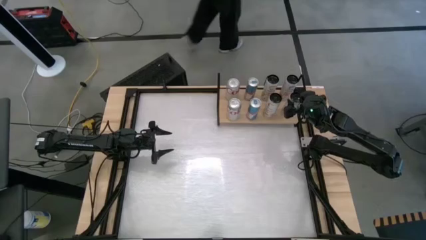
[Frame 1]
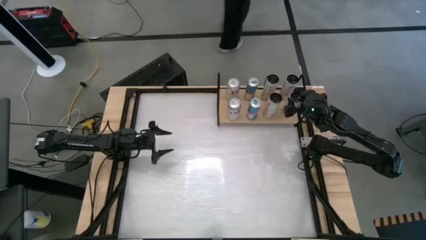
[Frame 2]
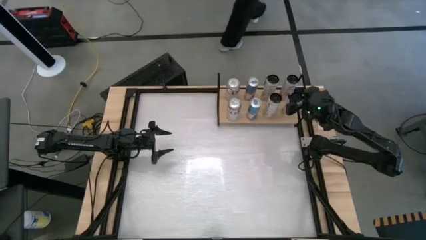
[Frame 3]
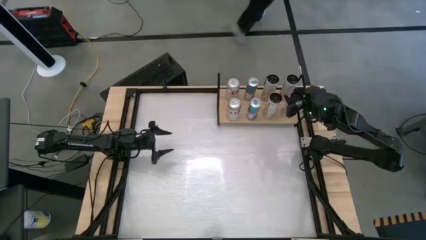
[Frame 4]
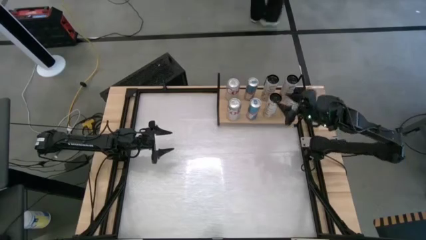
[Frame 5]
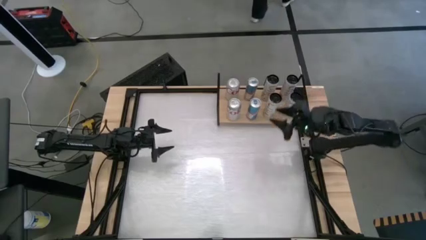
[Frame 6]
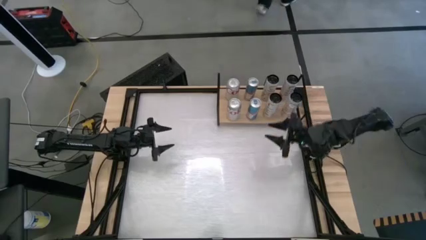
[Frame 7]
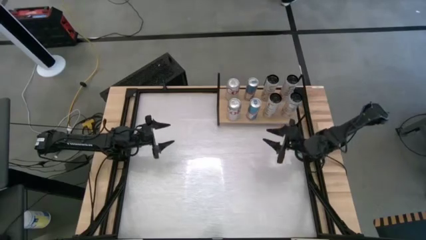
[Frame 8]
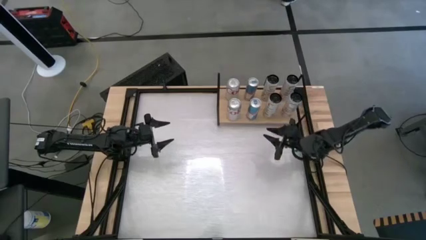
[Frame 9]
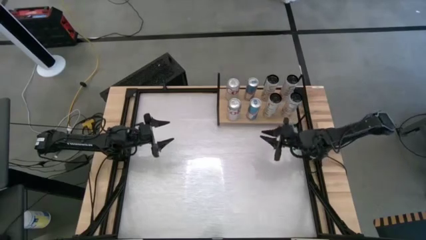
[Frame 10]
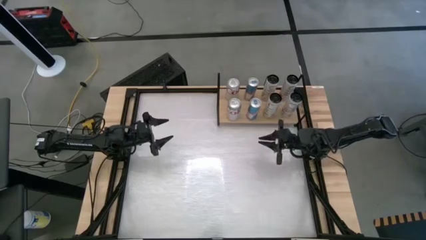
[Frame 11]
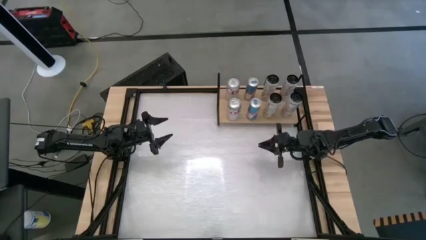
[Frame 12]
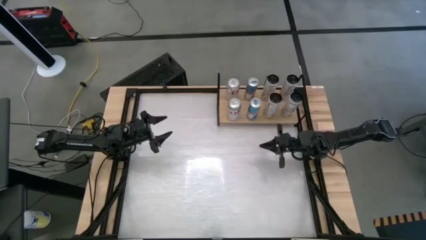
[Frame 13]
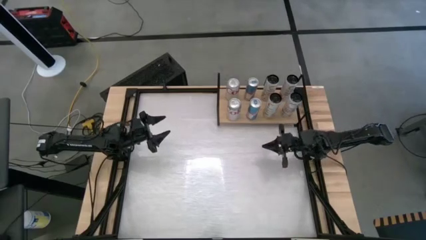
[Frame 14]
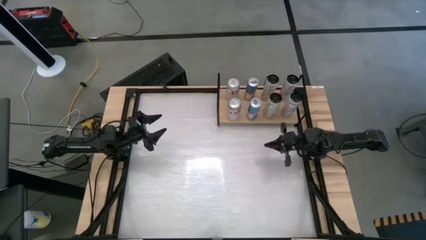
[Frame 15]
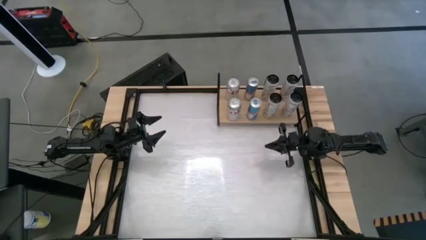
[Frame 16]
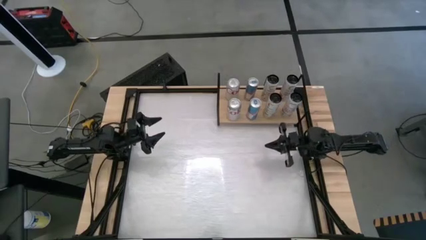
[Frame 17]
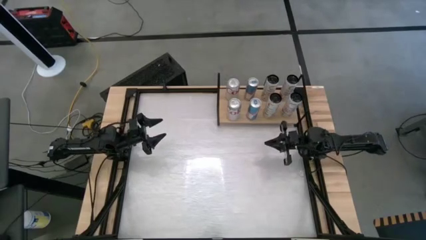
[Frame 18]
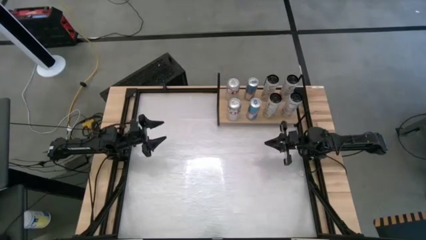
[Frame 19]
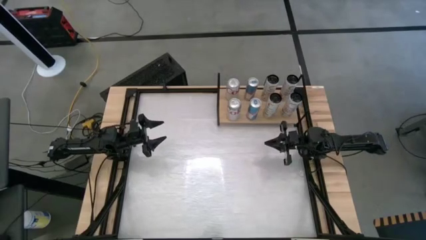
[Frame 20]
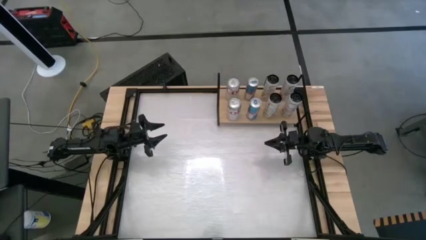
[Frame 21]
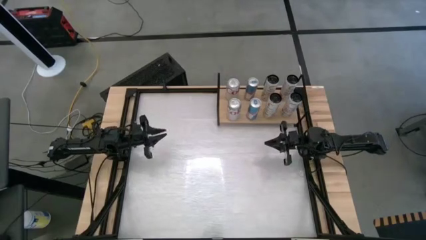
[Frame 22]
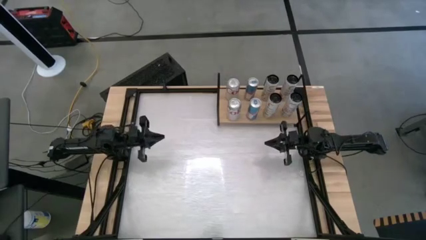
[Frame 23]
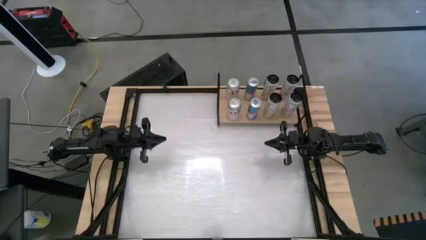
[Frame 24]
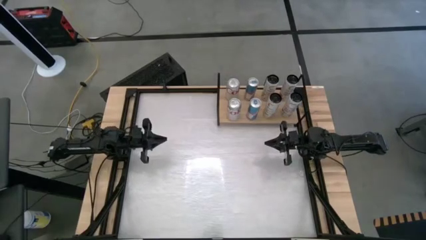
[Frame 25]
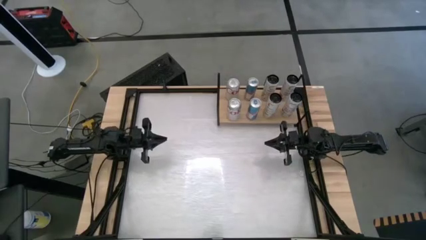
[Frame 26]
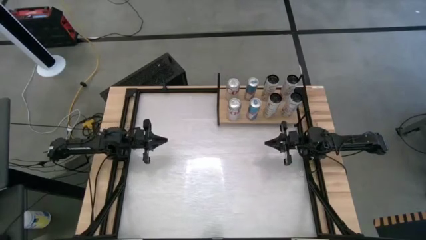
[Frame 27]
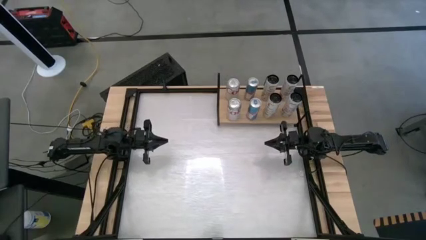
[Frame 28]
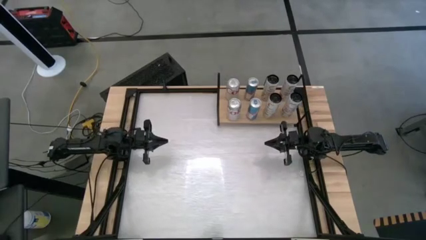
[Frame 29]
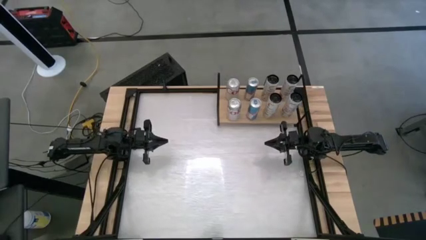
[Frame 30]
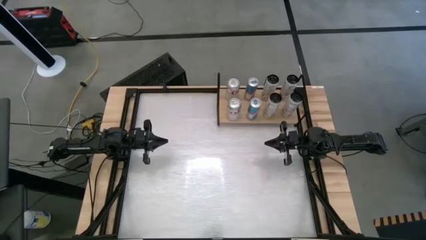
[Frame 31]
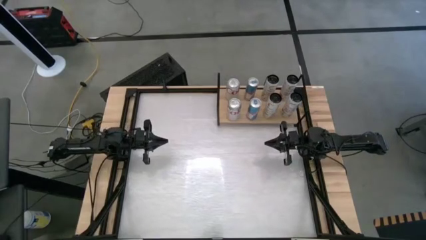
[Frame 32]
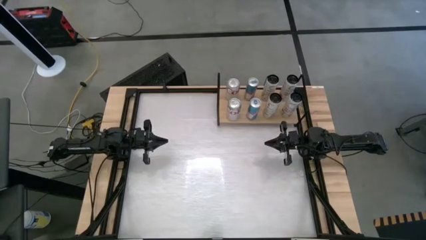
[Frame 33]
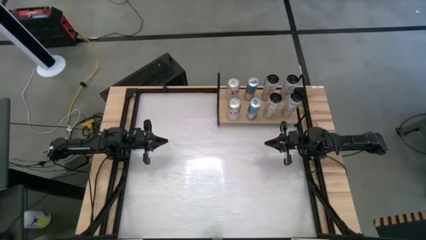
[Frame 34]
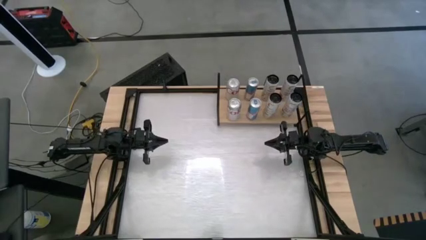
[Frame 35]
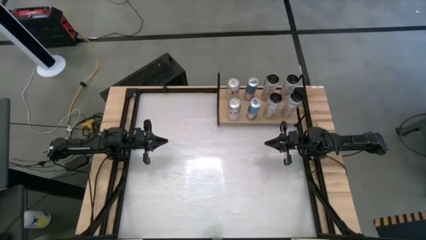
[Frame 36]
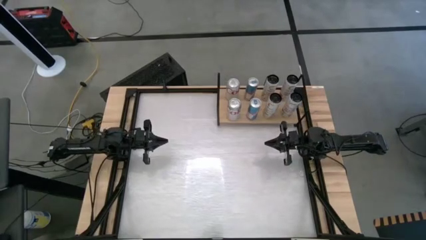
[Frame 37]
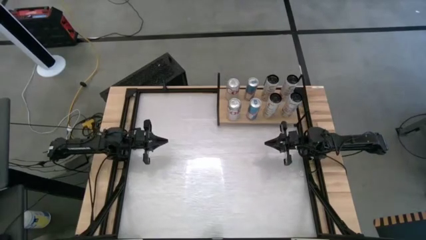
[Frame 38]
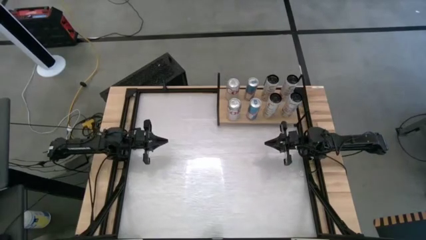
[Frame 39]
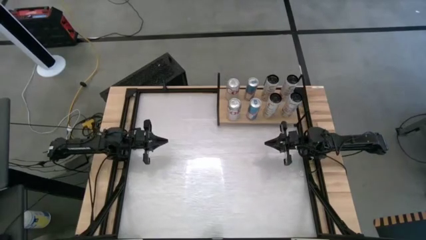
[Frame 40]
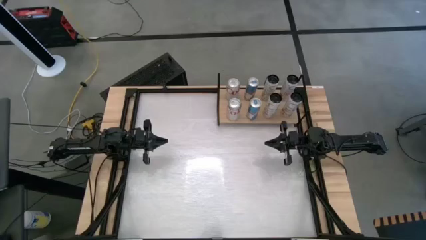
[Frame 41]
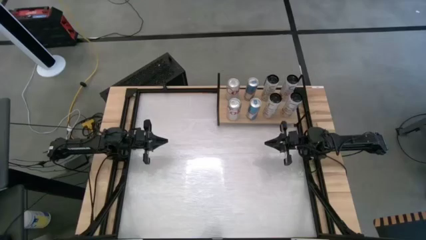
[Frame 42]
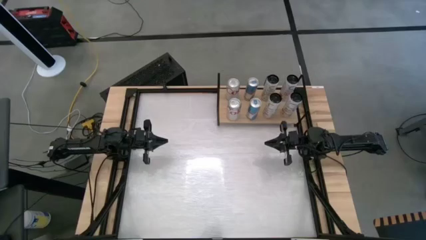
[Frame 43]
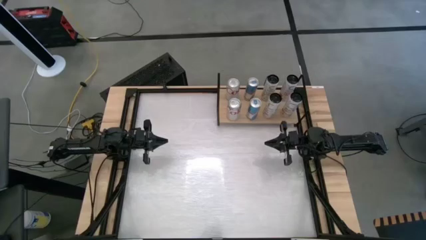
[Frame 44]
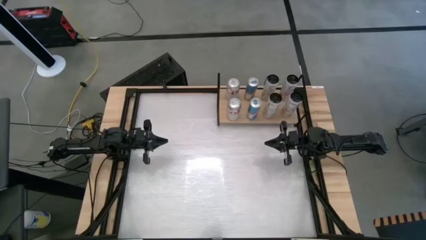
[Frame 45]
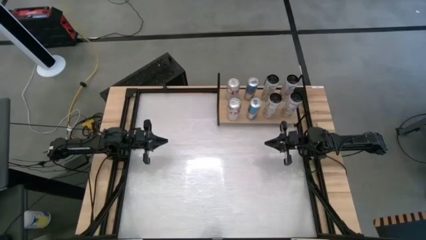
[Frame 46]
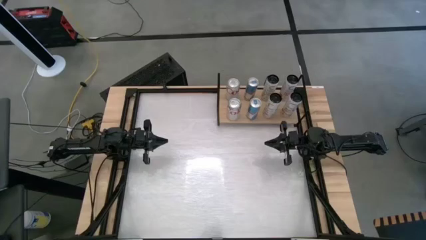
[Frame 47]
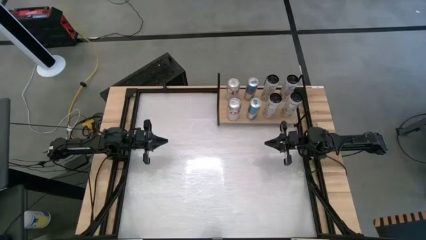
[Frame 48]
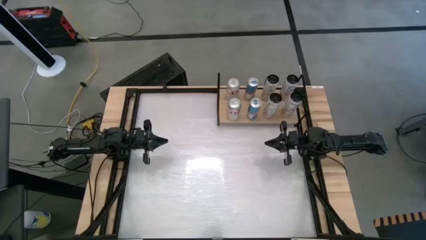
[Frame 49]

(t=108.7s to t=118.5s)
Task: Place canned beverage on shelf
Return to home position

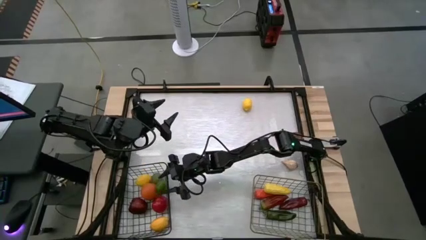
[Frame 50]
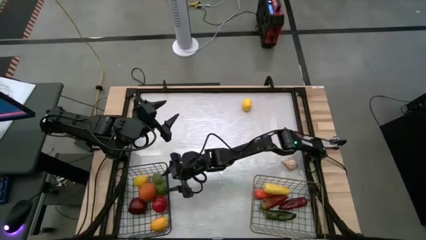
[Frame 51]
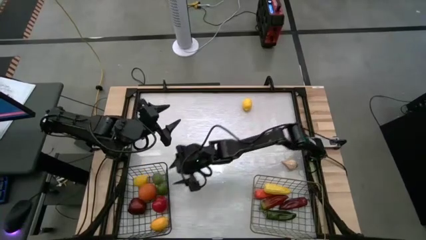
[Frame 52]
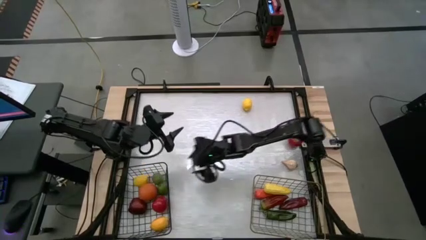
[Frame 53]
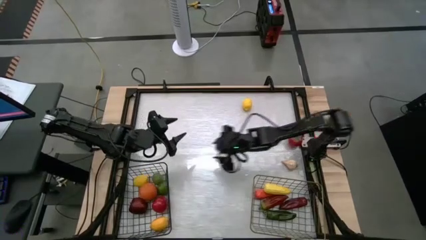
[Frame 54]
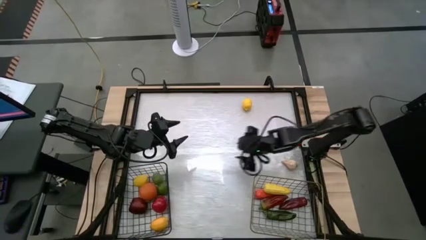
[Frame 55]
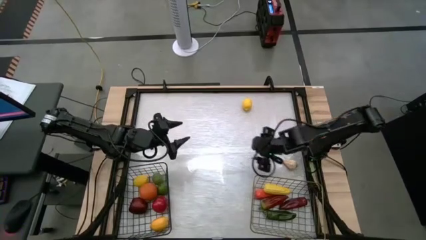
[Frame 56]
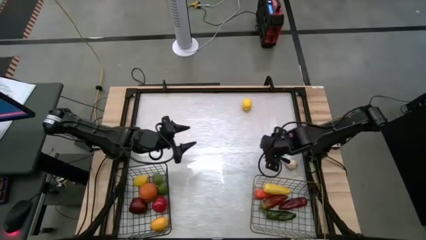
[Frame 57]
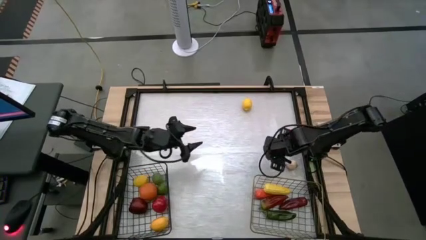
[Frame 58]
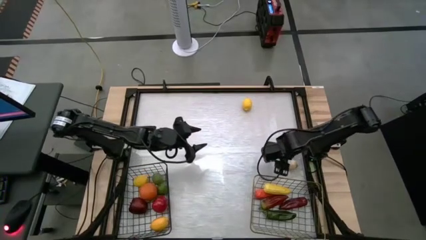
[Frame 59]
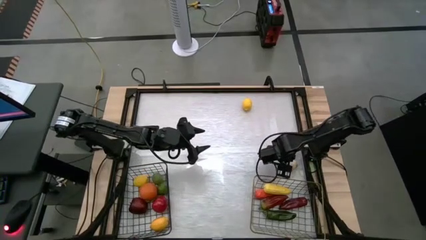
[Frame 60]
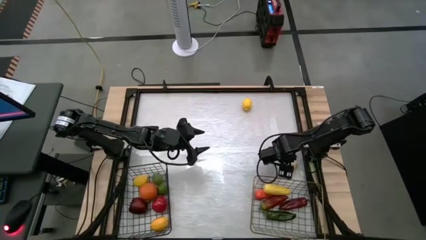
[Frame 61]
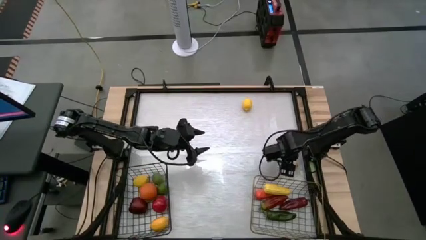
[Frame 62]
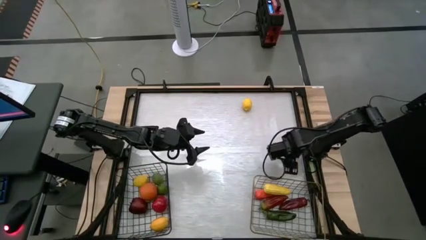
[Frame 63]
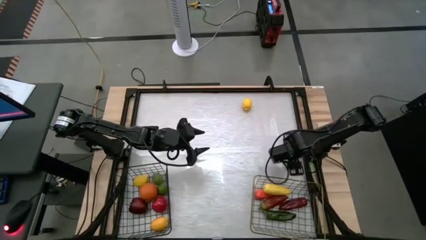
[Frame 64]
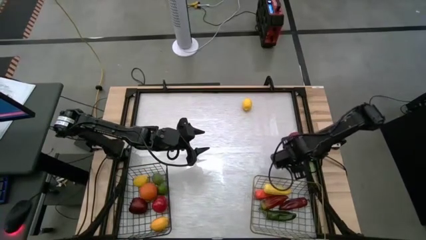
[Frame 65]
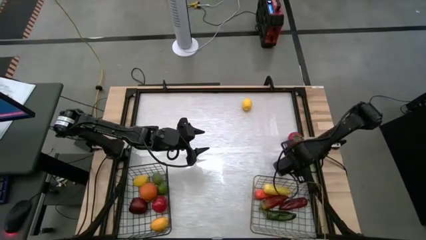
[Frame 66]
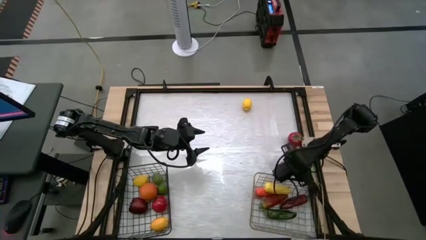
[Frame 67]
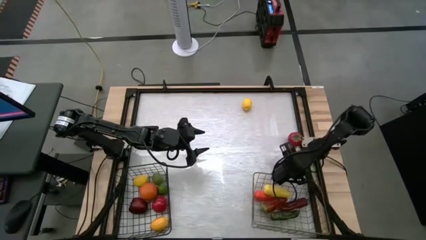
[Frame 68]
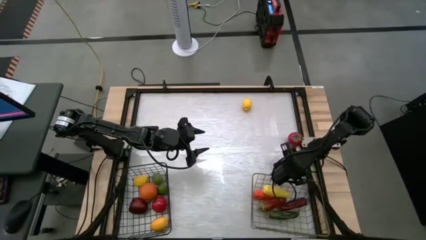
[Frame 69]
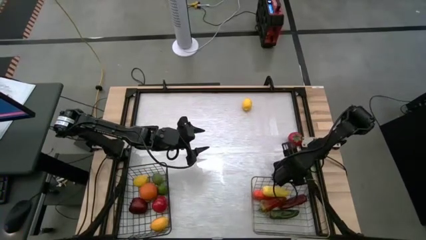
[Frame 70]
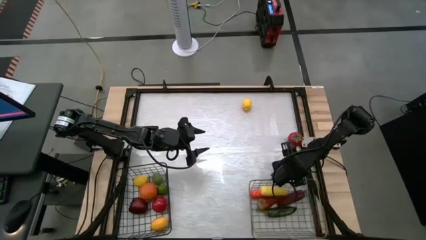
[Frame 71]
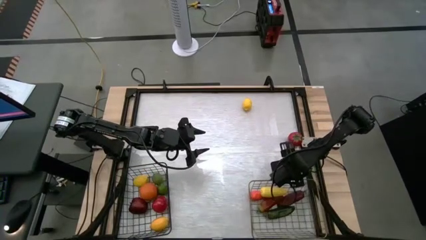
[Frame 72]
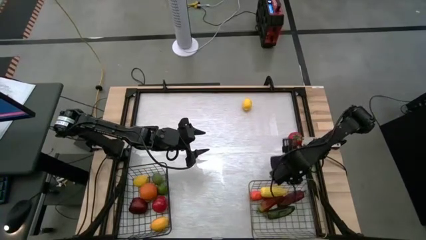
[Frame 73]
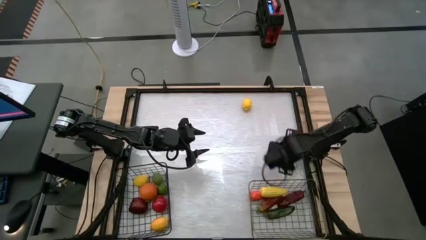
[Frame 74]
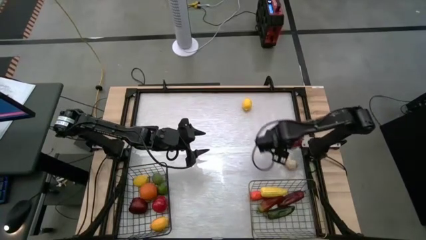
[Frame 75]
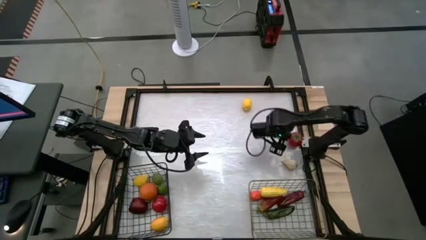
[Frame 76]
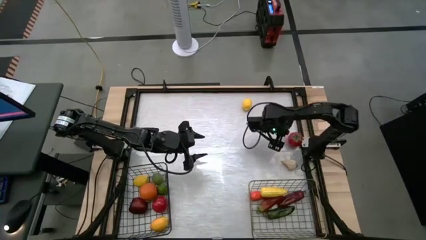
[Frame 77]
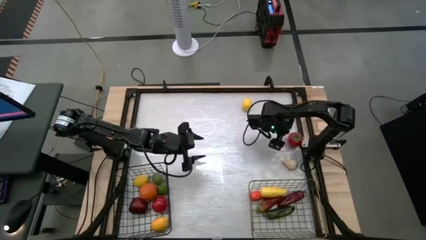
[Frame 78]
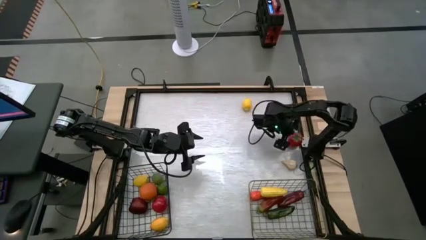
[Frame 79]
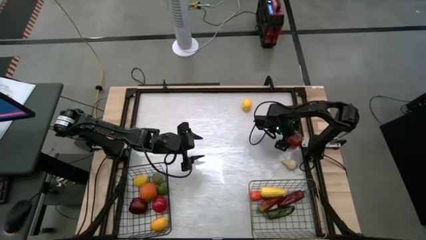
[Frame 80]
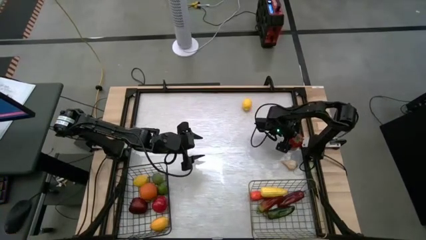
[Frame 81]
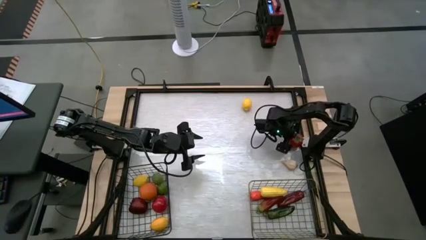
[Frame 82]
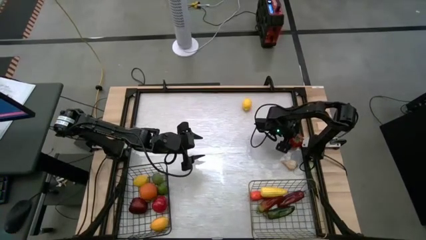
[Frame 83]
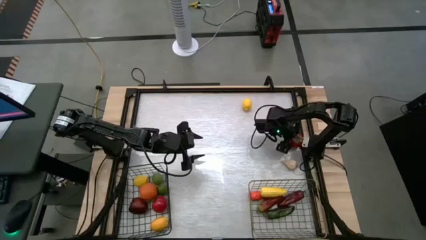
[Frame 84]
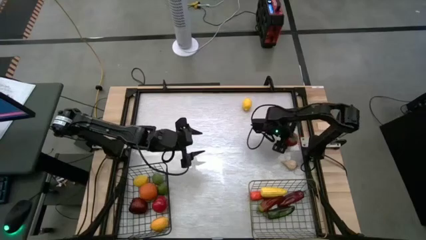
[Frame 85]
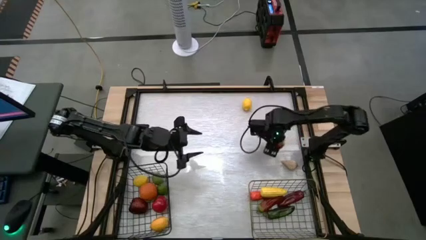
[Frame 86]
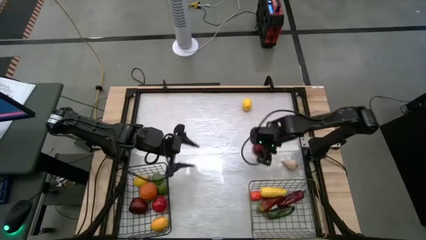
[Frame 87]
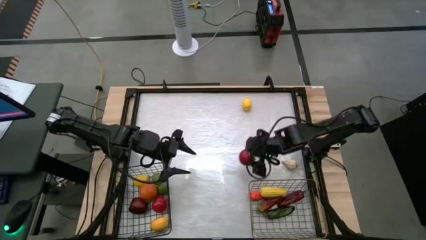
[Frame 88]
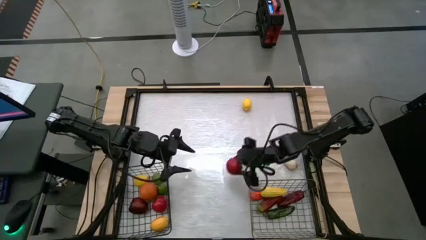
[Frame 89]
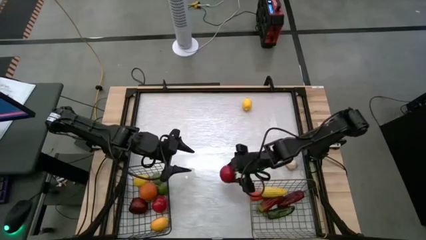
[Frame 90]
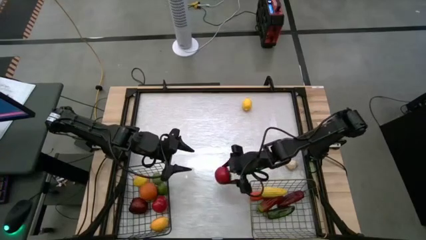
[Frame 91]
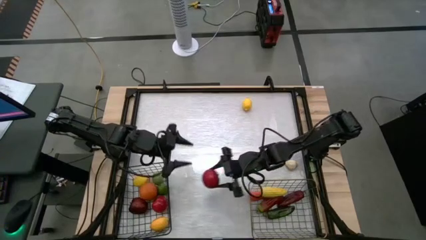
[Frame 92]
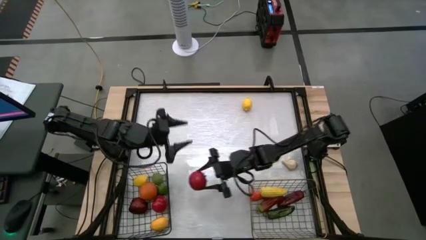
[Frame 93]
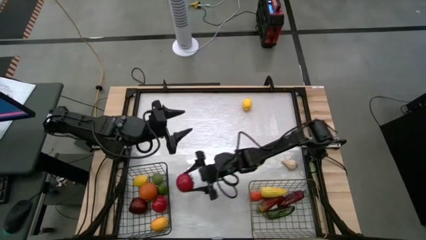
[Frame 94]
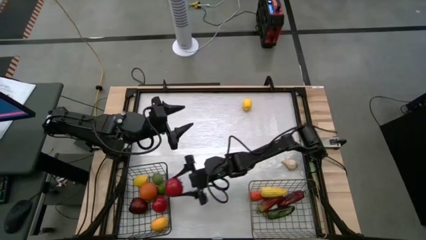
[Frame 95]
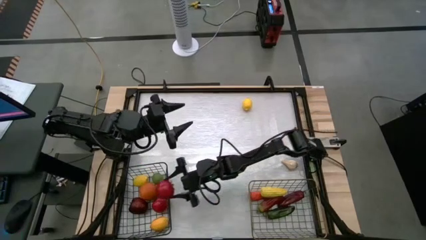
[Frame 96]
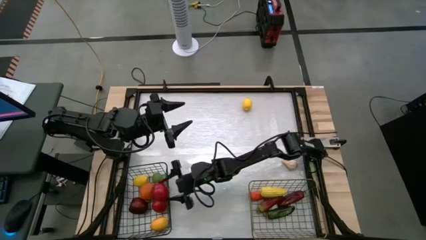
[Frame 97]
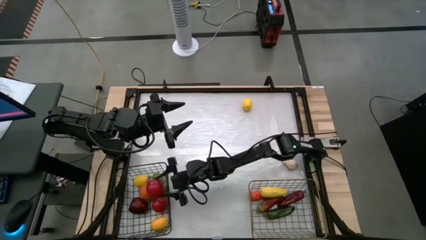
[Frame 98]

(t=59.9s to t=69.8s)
Task: Sort produce into baskets
Put the tomato into the black wire basket
